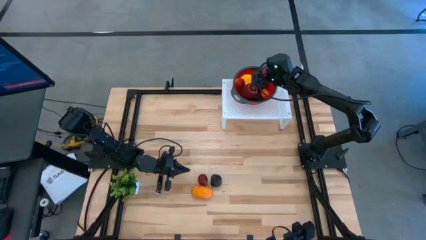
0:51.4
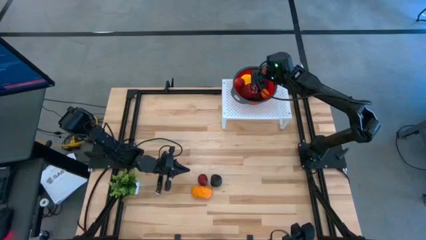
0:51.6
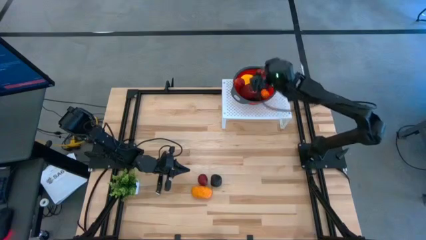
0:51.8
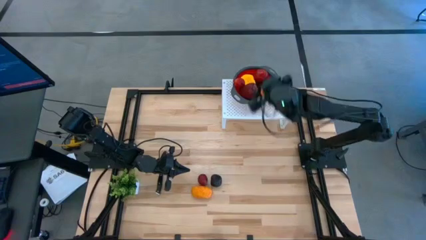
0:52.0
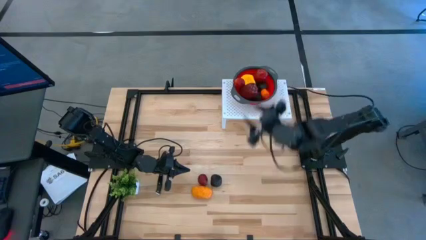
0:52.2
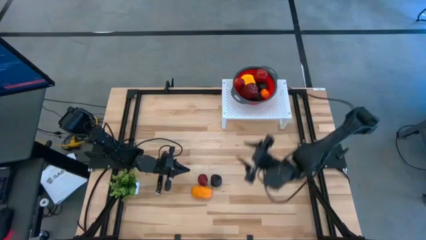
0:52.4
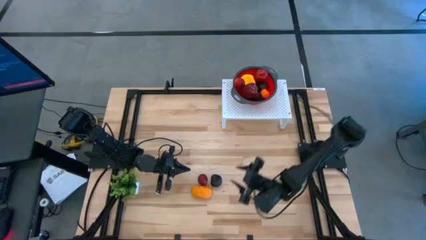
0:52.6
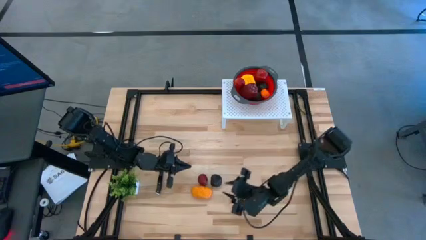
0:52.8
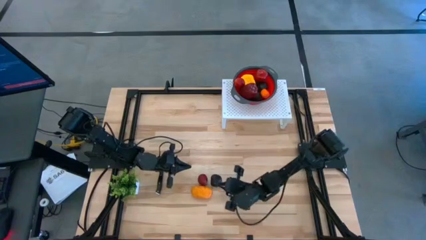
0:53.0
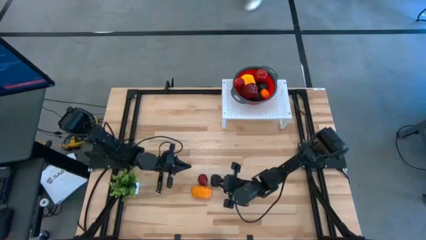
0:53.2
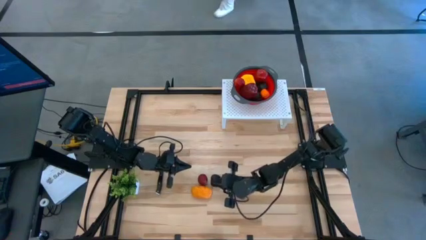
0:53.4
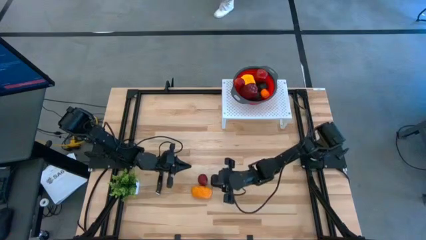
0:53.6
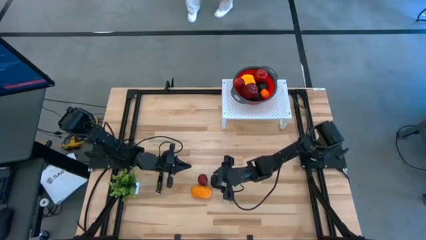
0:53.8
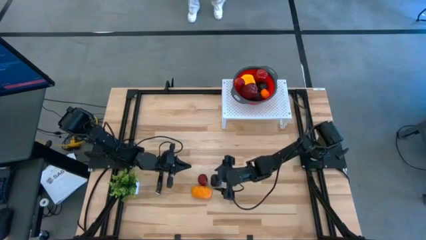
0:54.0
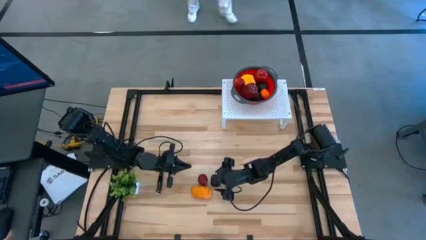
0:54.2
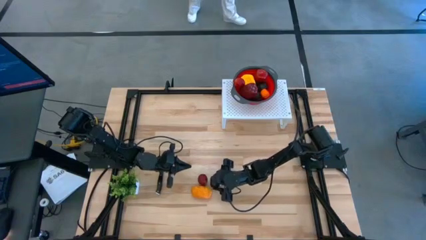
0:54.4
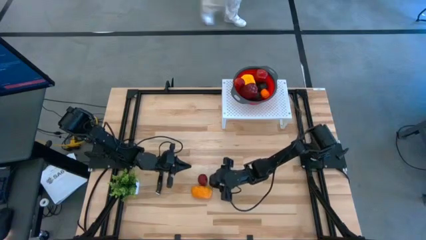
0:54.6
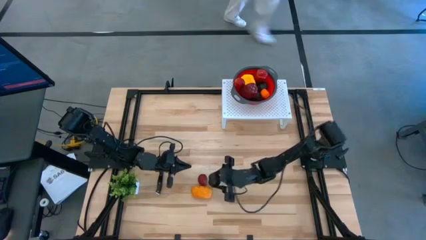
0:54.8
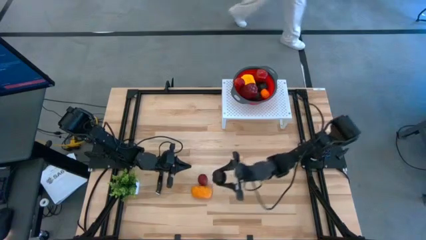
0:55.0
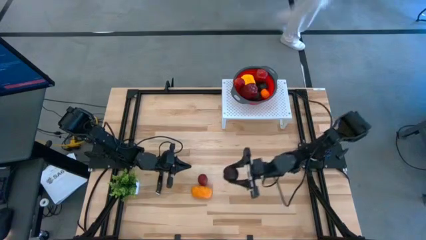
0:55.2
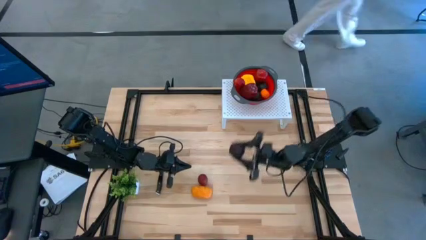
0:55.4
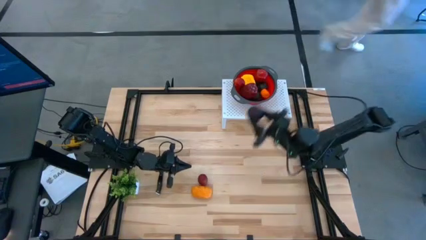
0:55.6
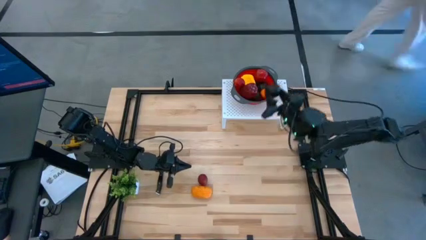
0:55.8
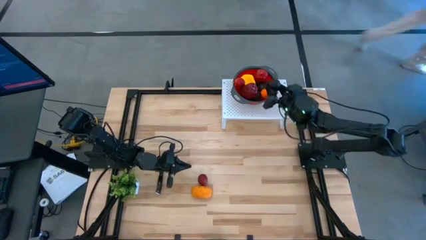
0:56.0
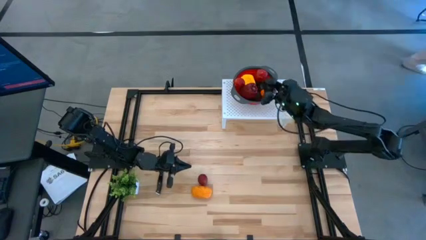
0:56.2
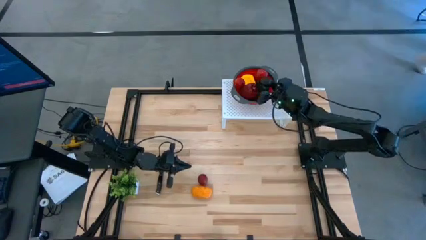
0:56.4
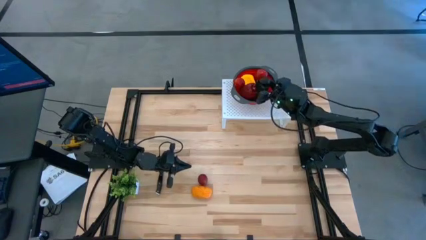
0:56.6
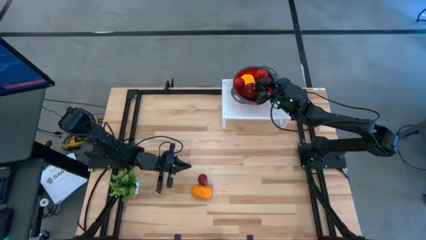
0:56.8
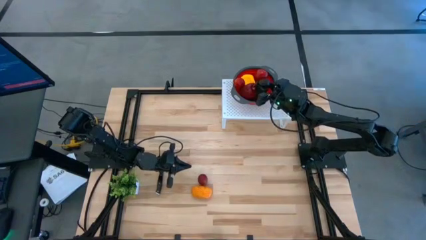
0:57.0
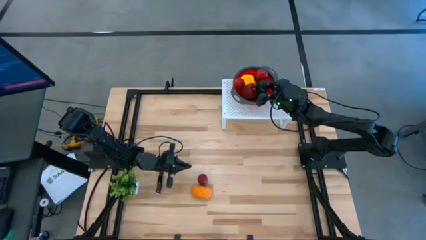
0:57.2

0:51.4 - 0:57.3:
Task: Pick & Place Fruit
Put the purple plum into the orange strainer bowl on the shelf

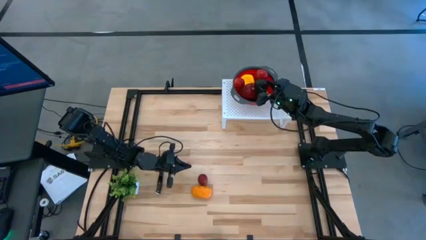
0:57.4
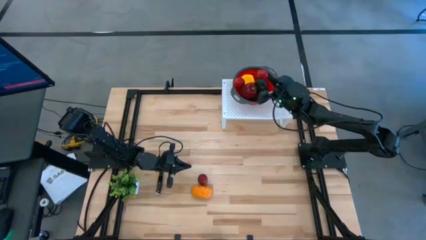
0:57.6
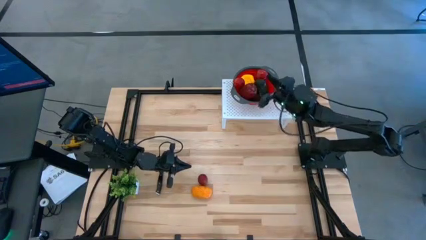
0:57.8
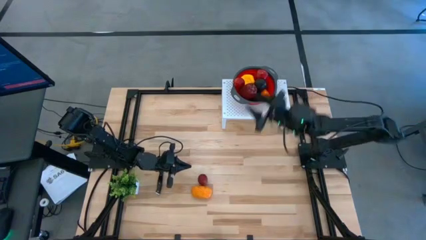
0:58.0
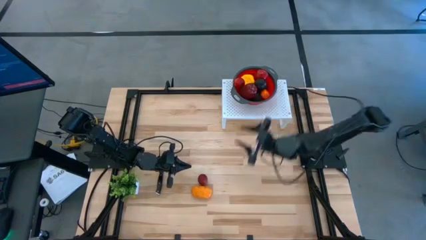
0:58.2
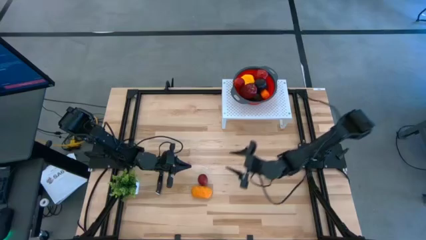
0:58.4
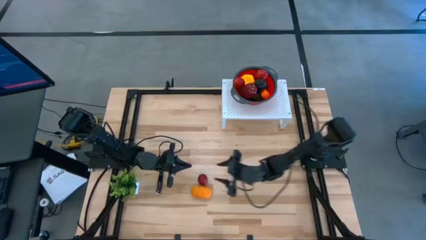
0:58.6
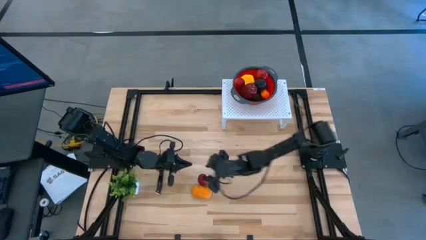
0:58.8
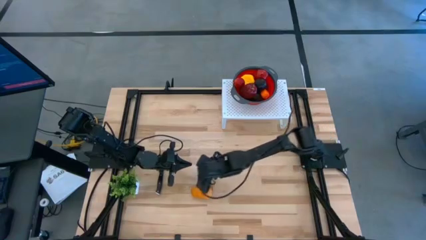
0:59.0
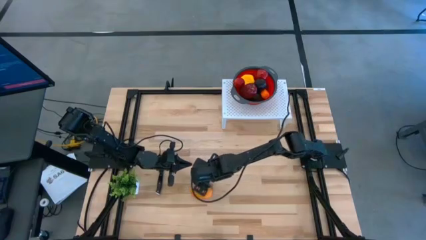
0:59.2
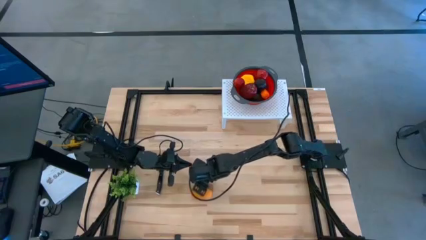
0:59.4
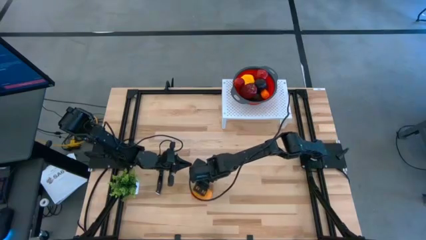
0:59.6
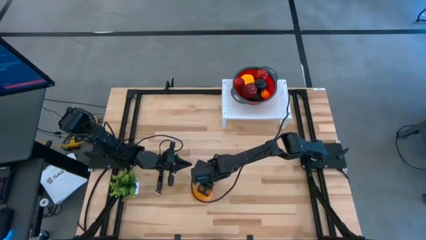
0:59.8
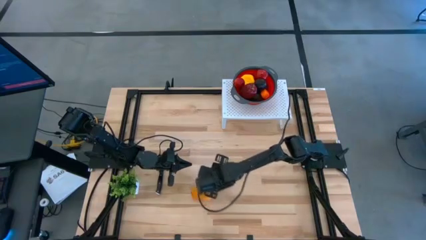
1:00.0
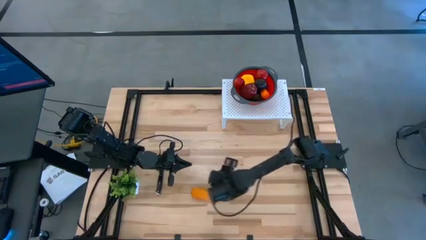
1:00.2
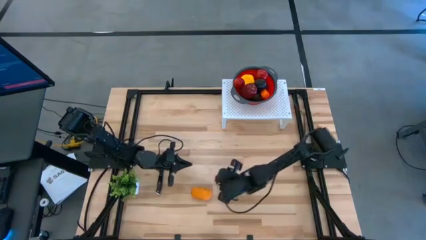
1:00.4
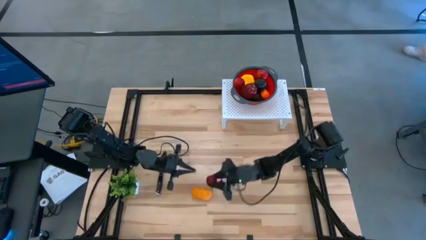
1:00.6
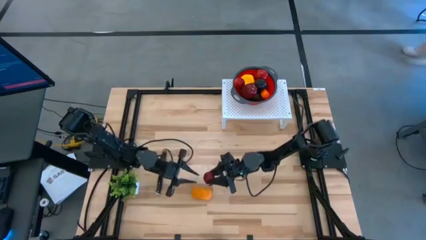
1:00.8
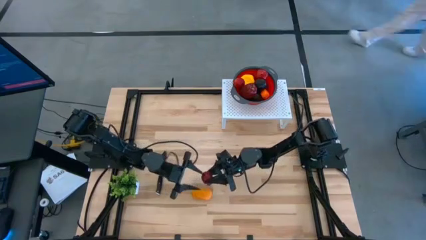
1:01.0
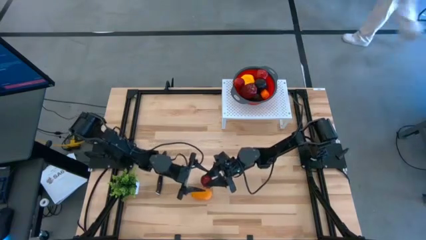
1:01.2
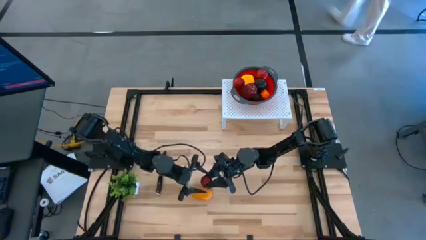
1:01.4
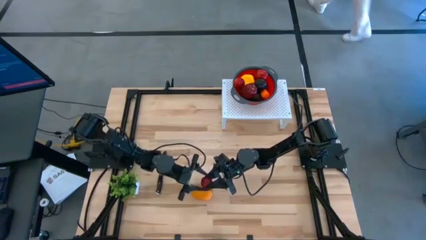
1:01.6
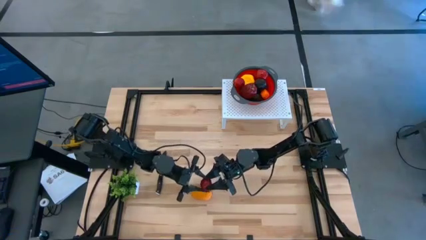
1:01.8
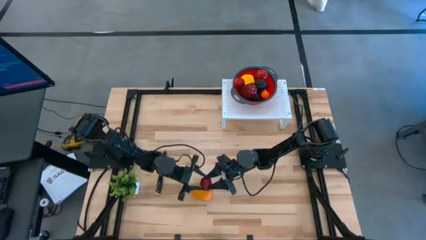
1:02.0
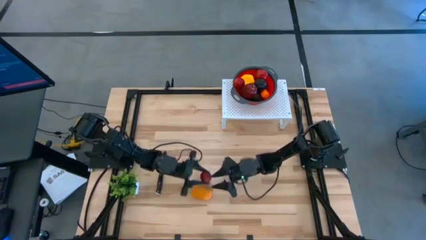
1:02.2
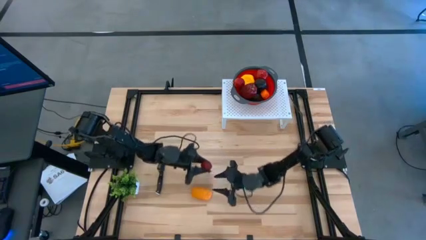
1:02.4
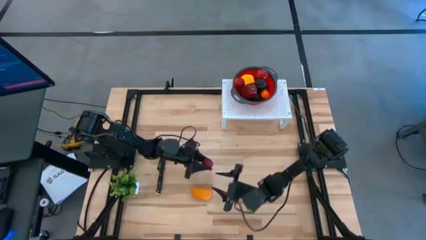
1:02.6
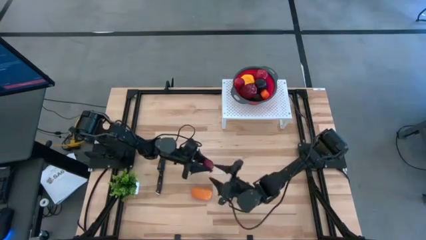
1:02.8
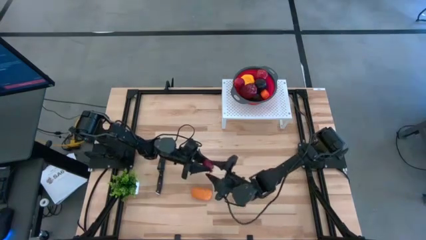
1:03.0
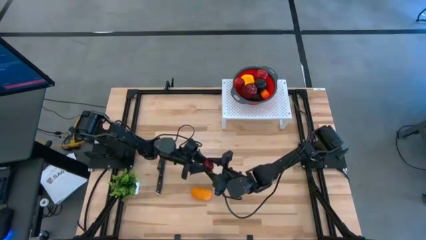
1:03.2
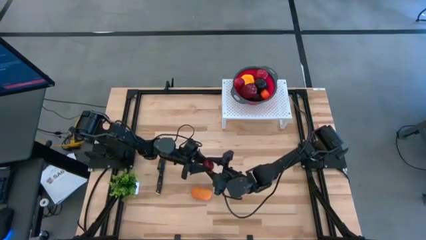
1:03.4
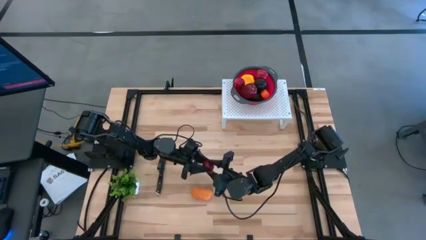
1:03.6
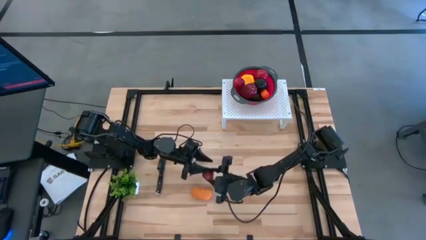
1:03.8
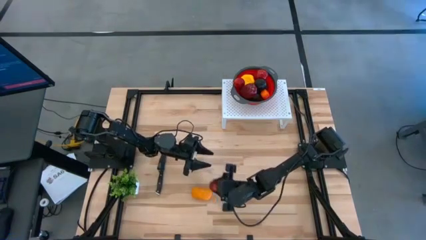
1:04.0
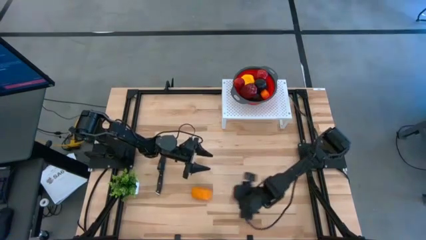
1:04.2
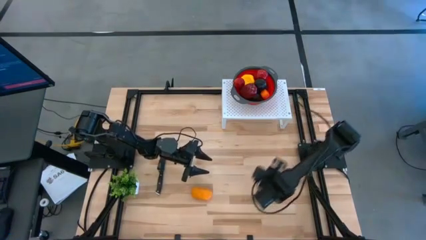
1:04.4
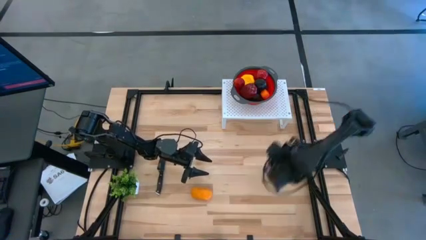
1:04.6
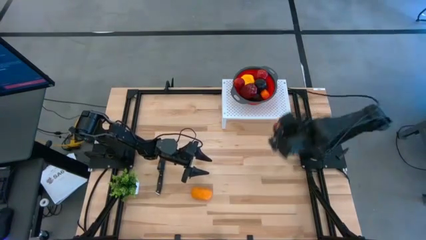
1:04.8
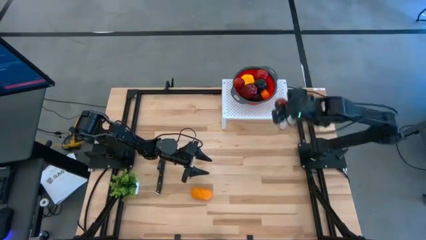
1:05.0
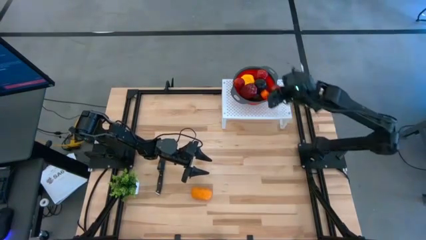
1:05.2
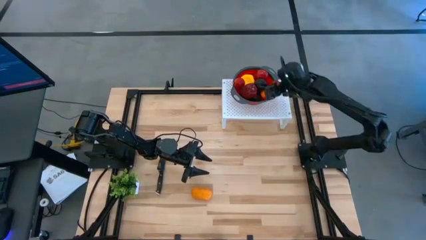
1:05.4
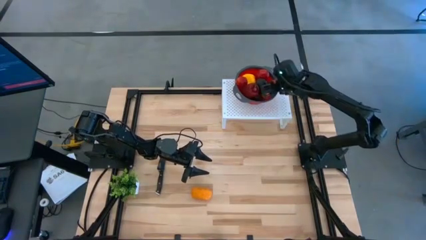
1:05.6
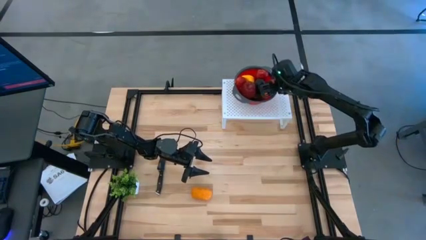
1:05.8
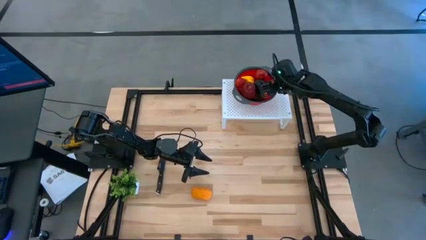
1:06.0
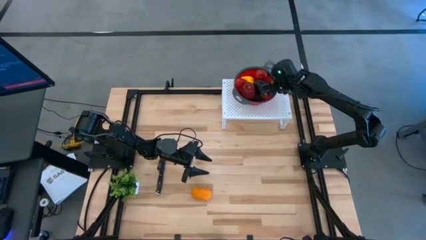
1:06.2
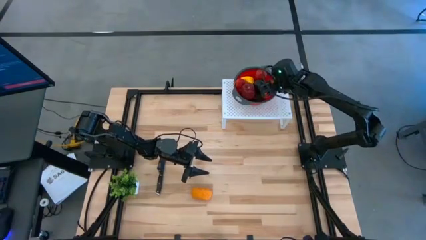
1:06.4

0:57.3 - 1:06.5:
Put the red pomegranate into the orange strainer bowl on the shelf

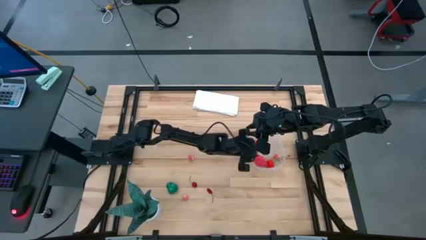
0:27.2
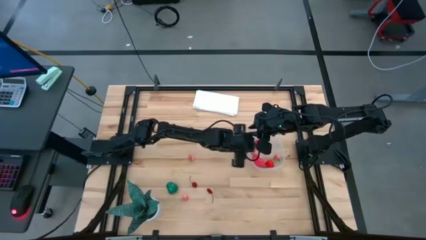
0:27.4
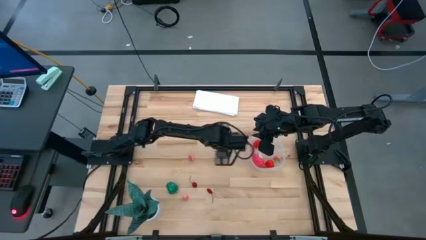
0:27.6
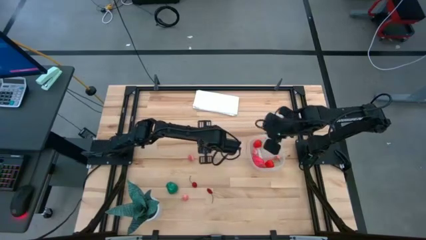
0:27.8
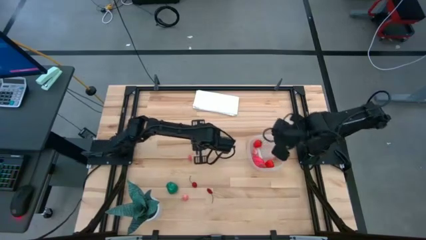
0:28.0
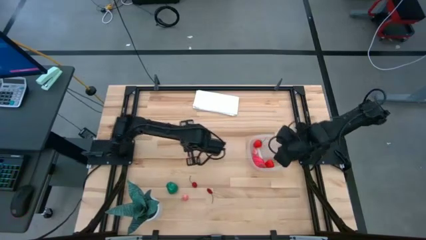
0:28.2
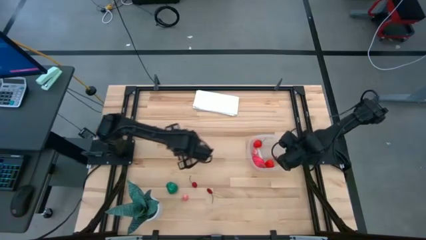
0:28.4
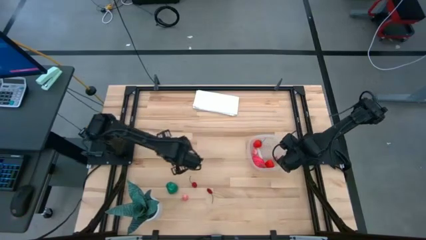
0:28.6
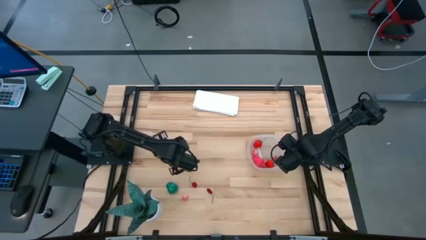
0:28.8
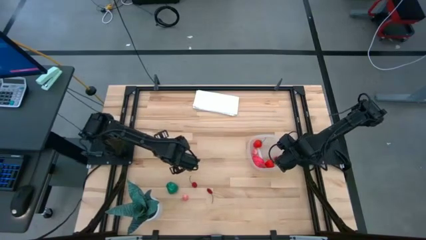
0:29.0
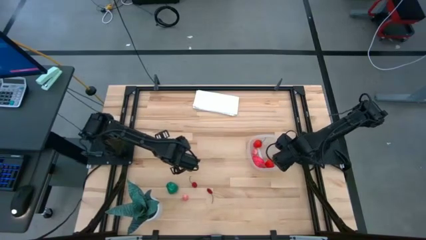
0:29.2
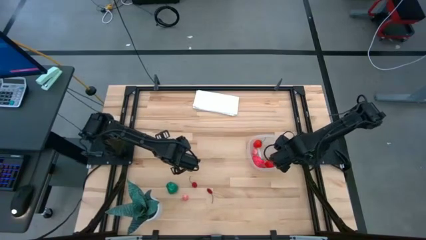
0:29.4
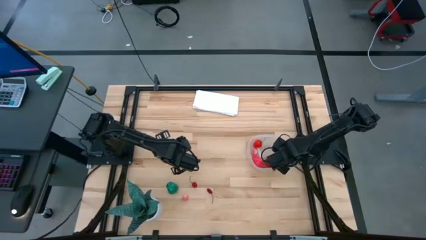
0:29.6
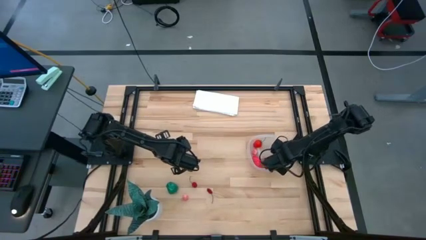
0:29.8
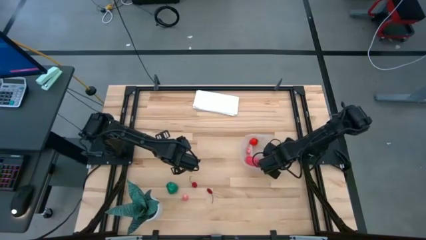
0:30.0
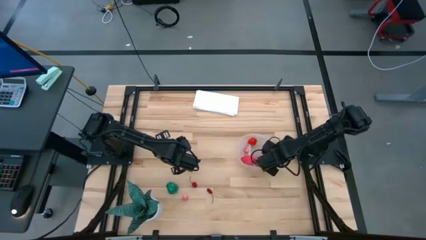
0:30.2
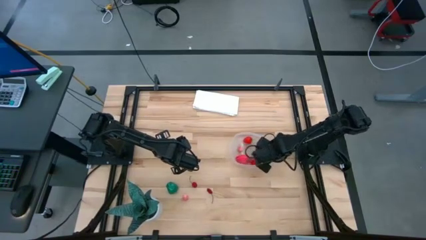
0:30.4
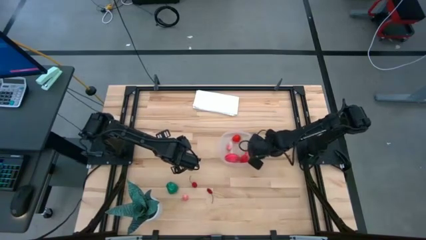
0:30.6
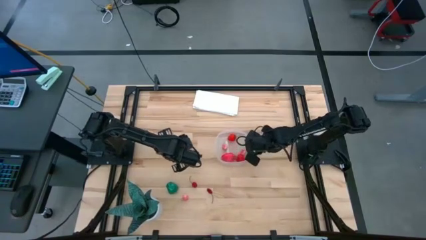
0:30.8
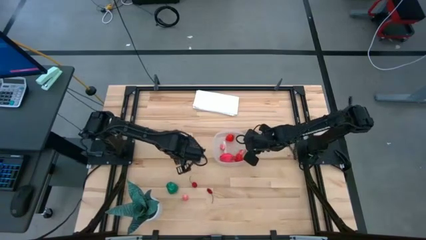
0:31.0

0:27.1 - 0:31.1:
Task: Pick and placing Produce into tupperware
Move the transparent bin to the center of the table
